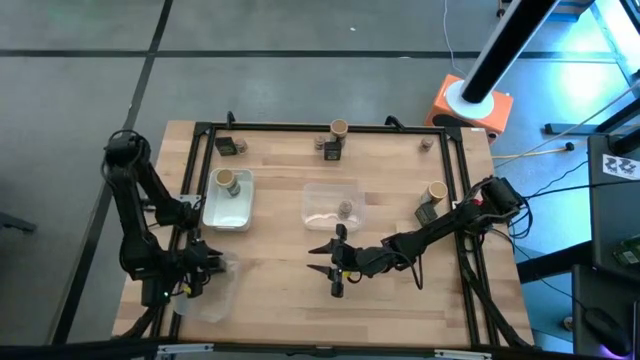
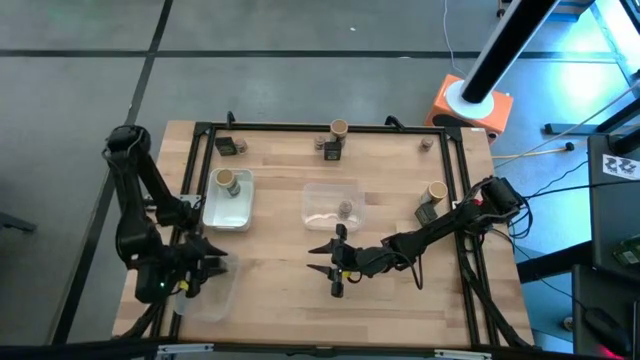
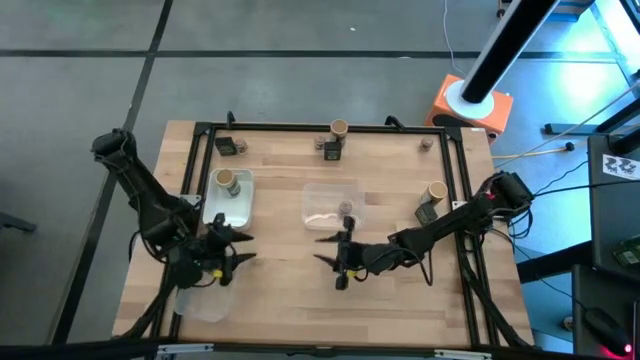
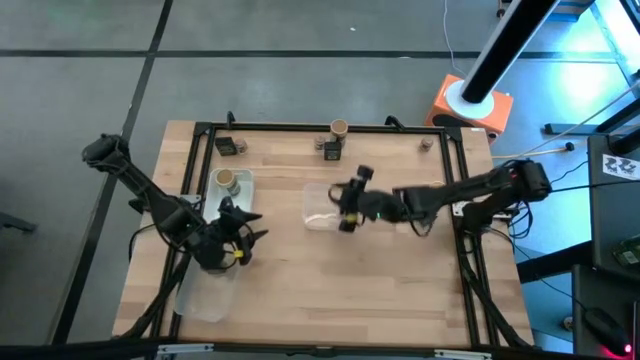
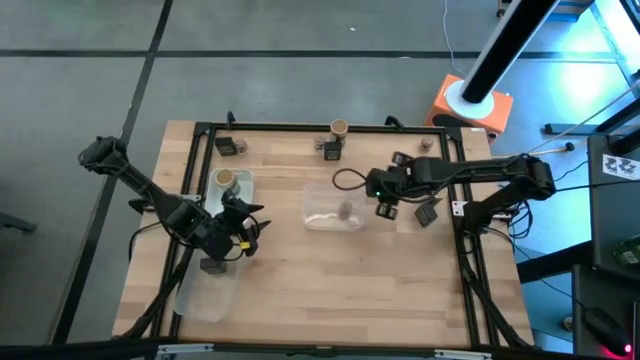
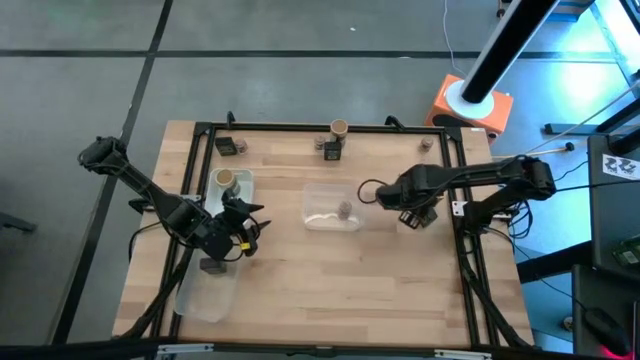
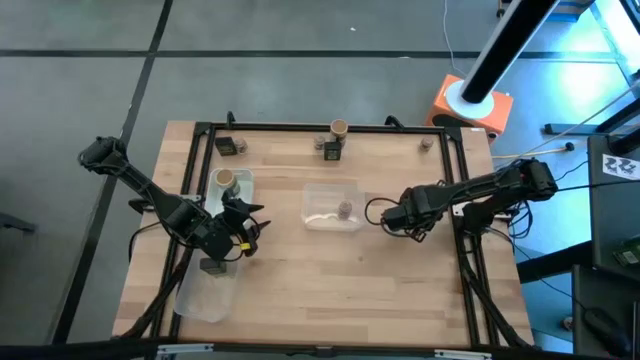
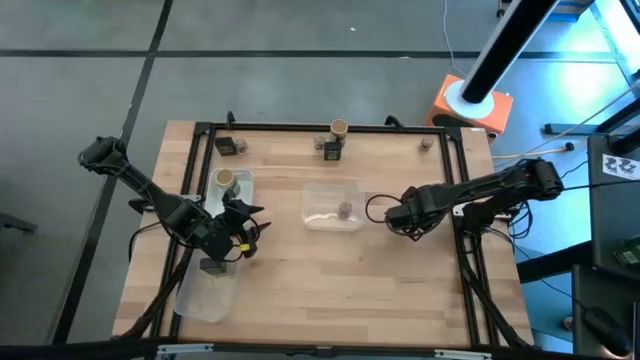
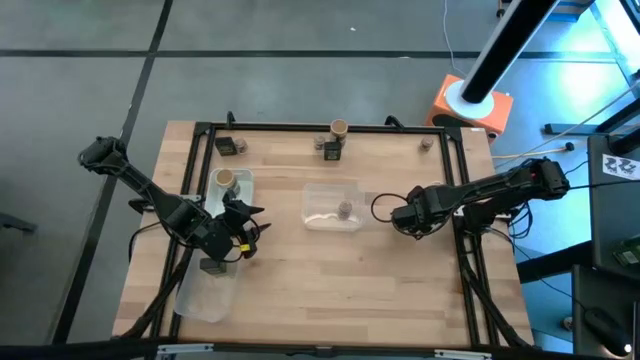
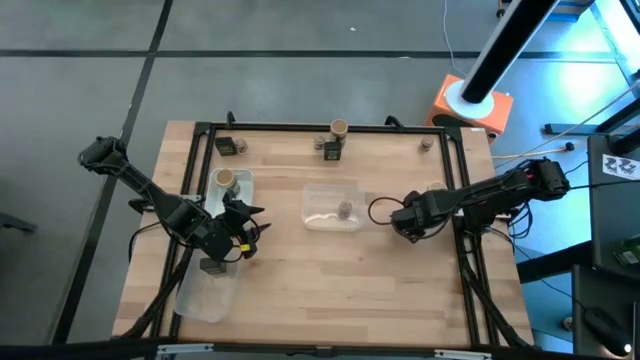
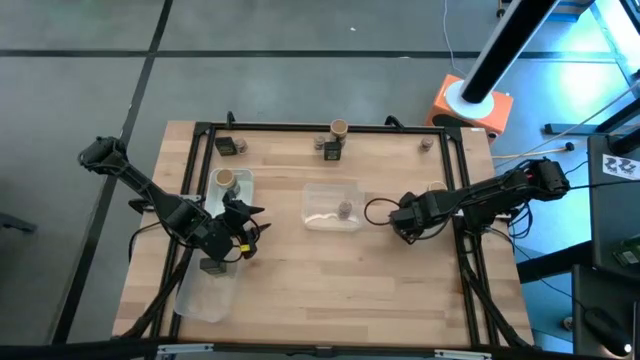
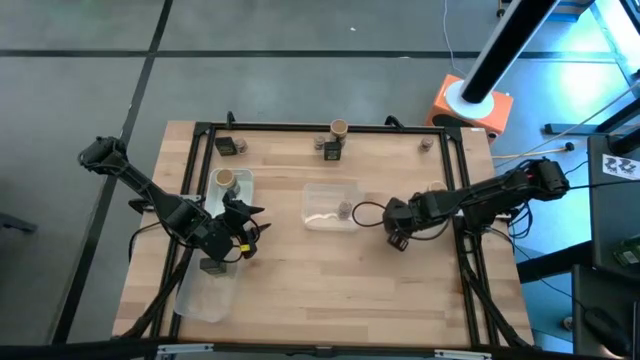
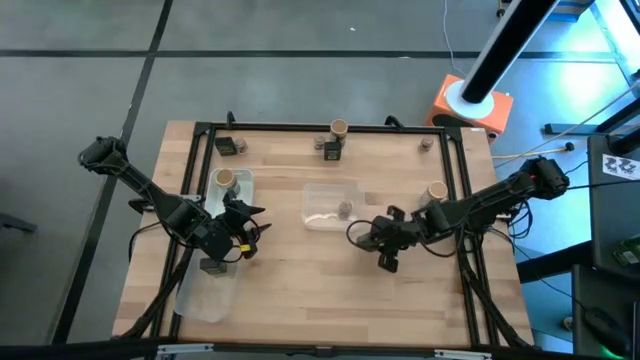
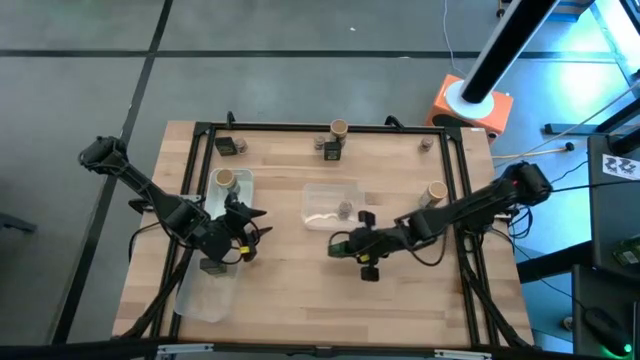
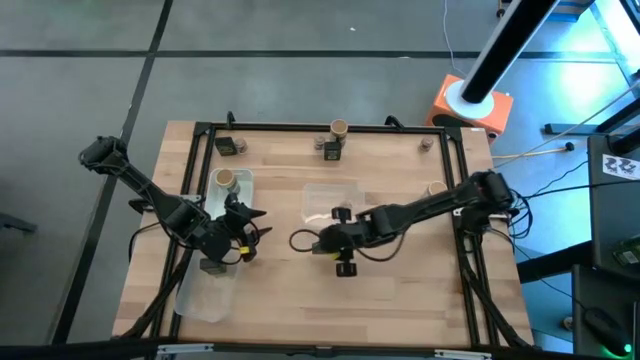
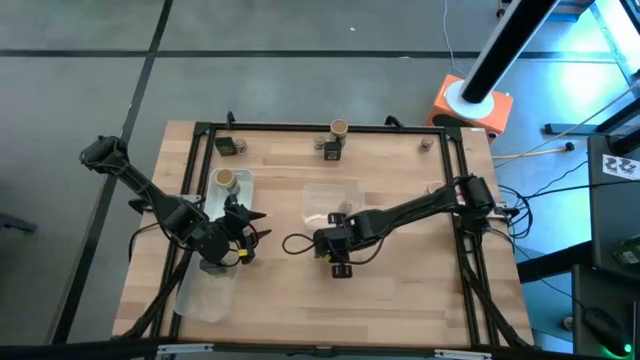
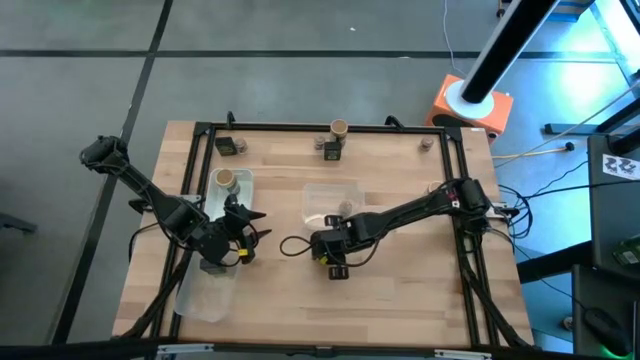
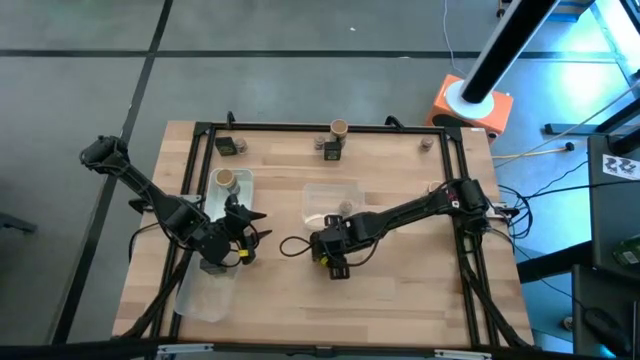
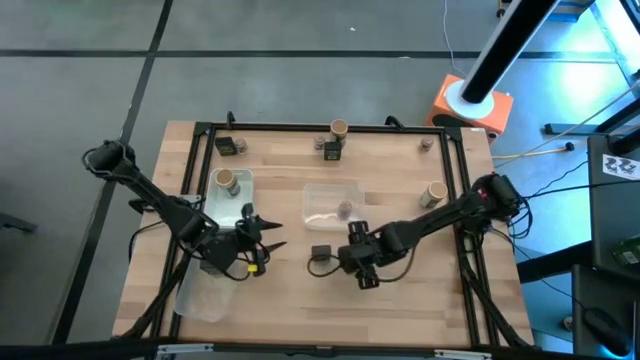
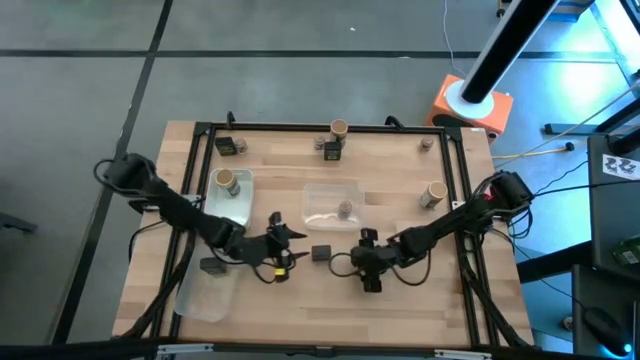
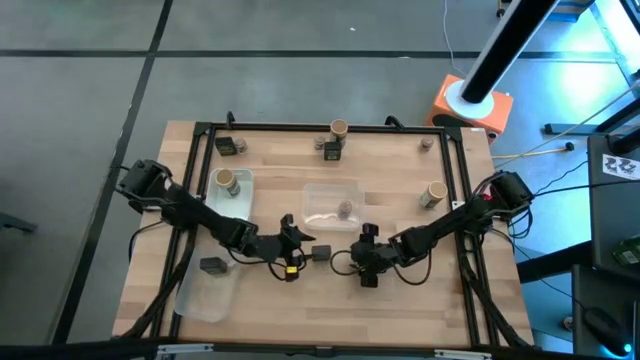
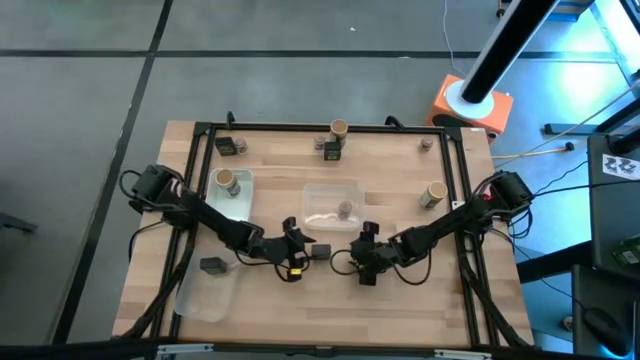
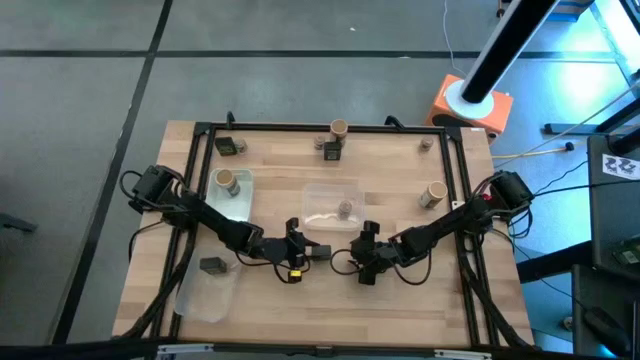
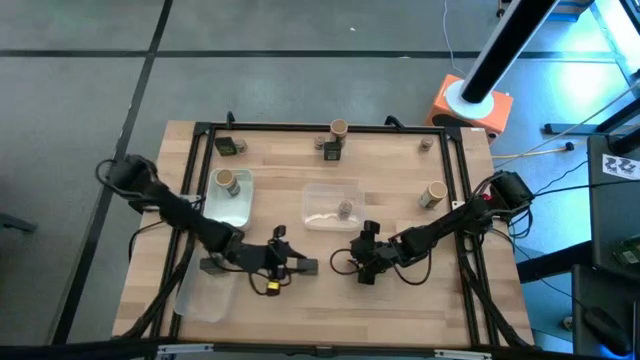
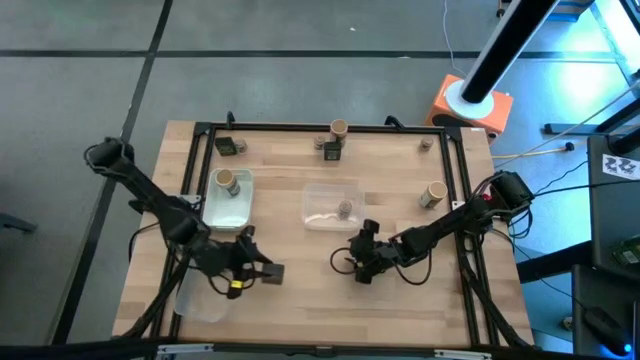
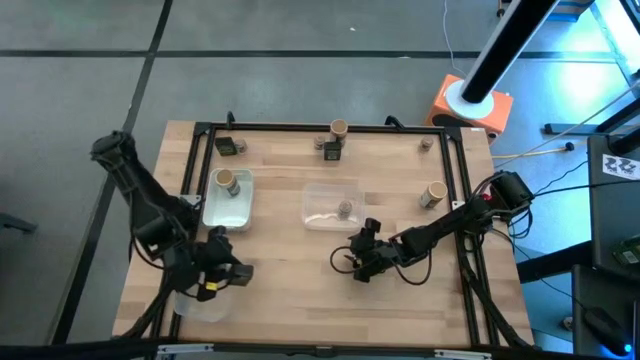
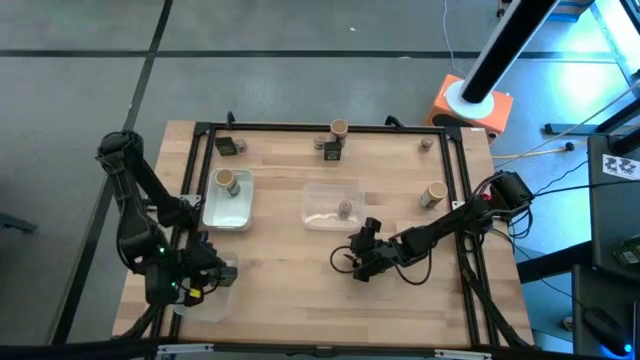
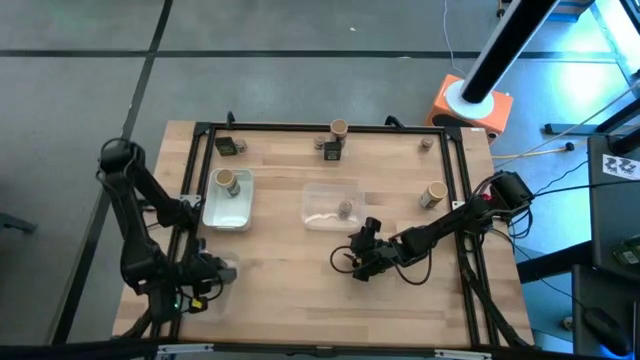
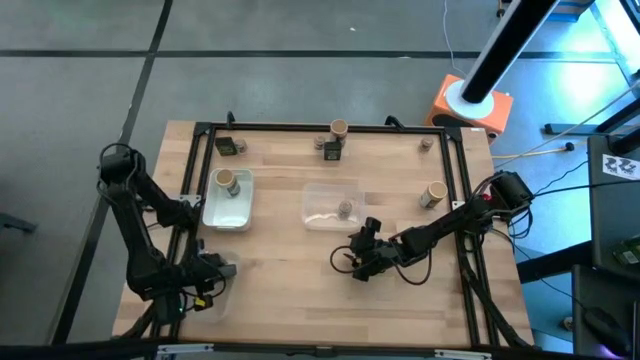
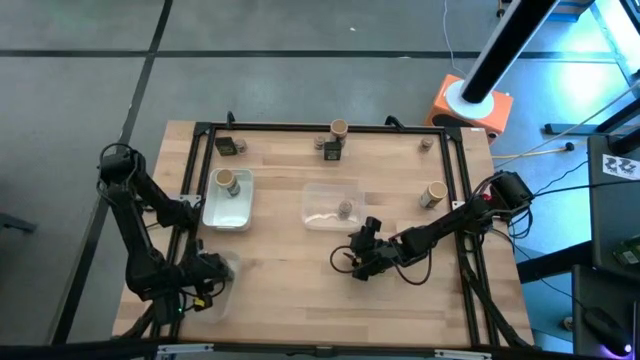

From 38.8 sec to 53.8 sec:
Task: Sort spices by type
Put the black seasoning can into the bottom transparent bin

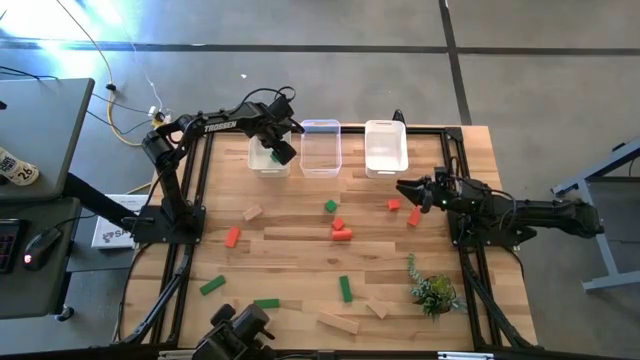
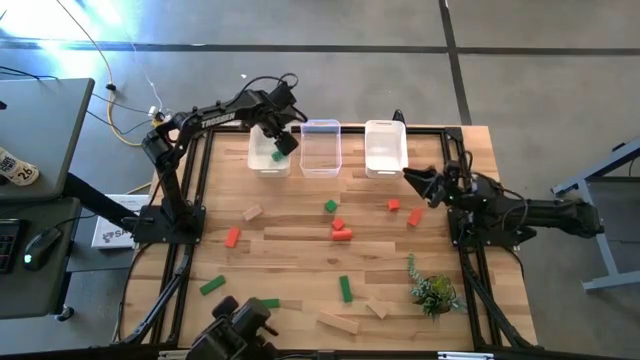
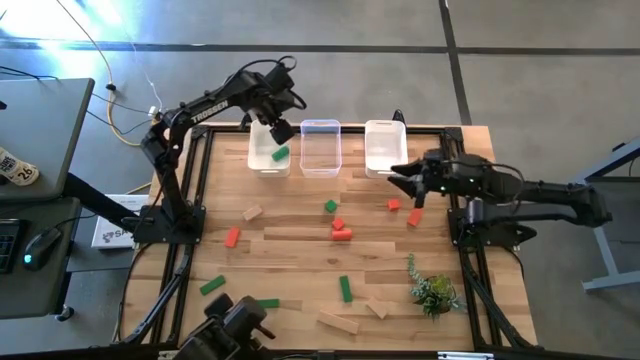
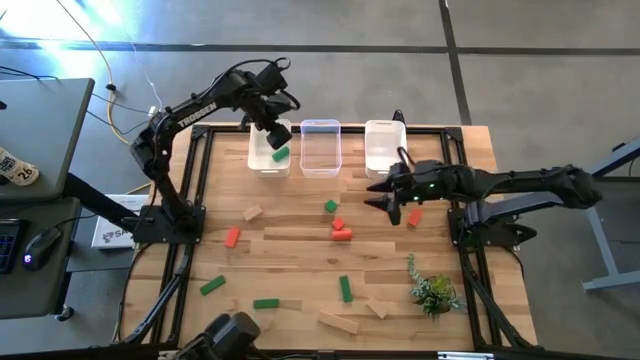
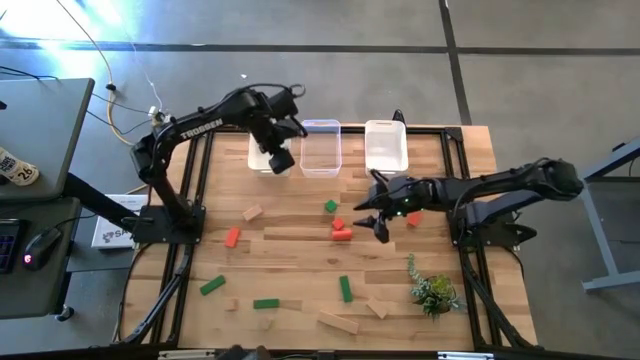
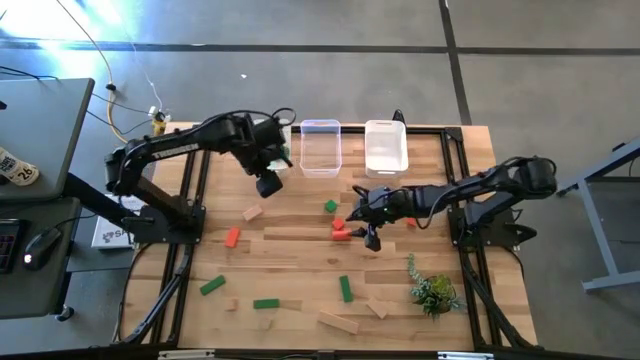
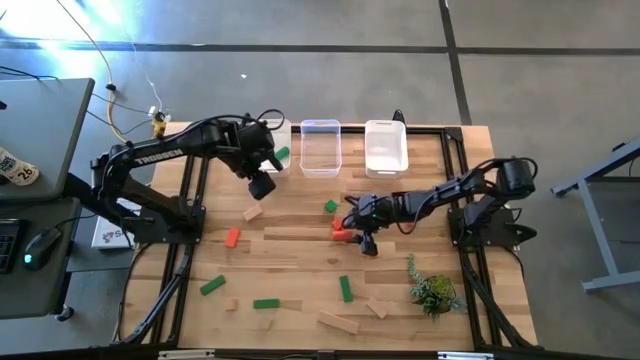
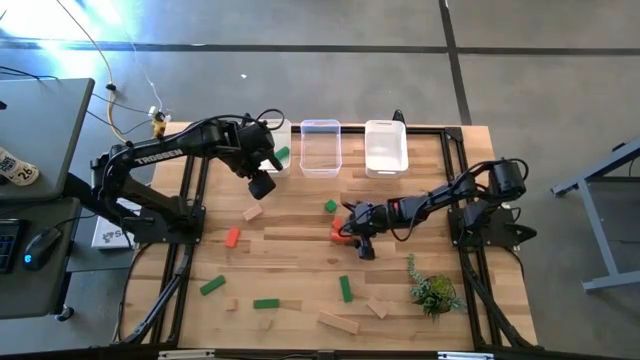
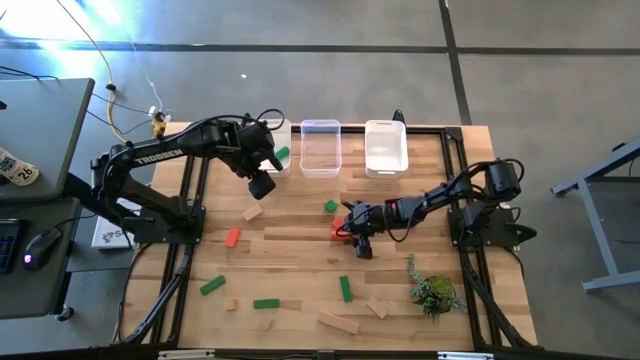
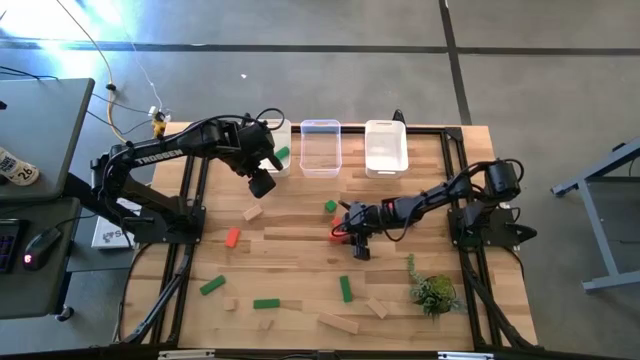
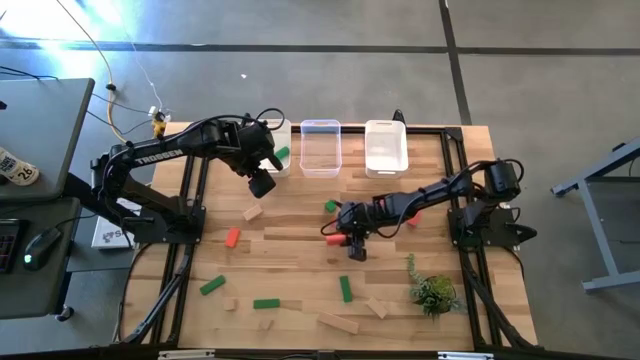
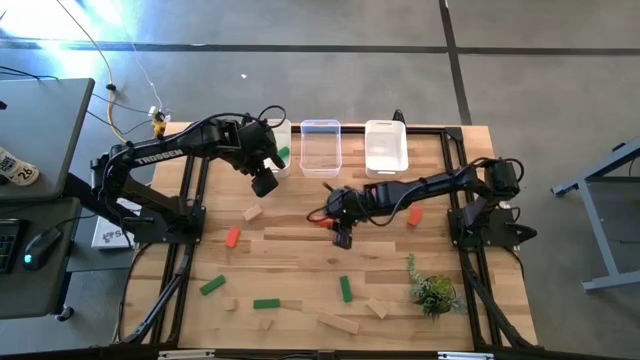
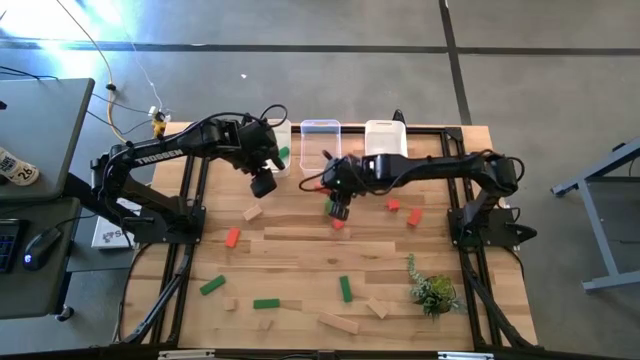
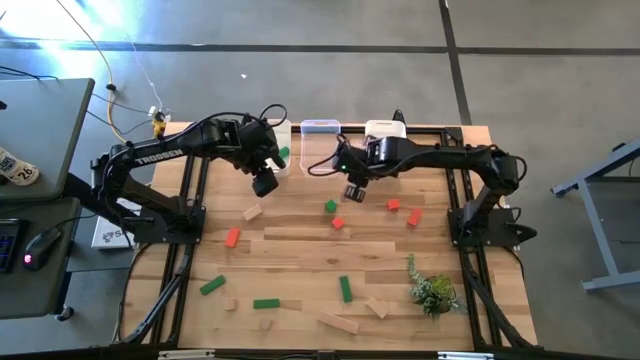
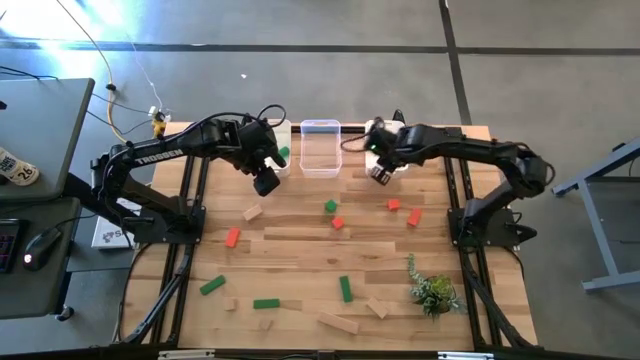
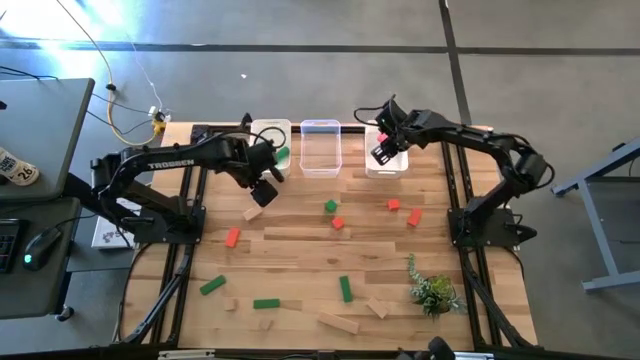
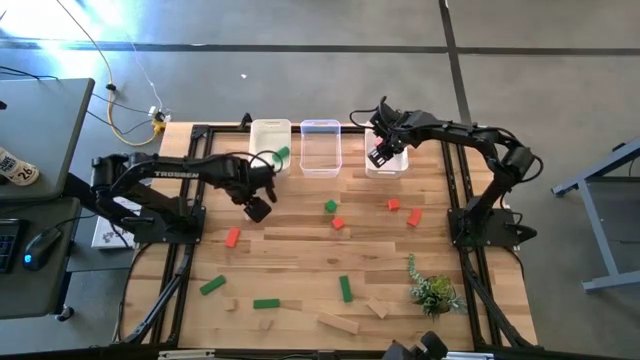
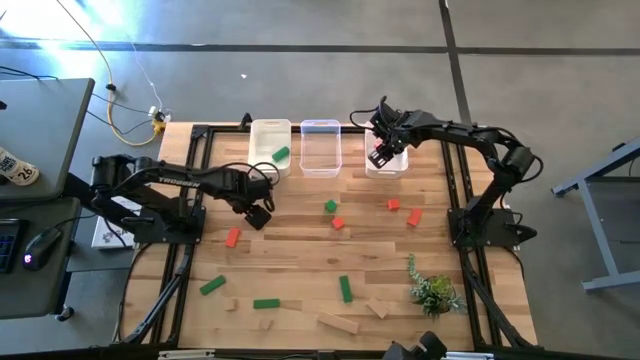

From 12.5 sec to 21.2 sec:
Task: Sort & place blocks by color
Put the orange block into the right white bin
